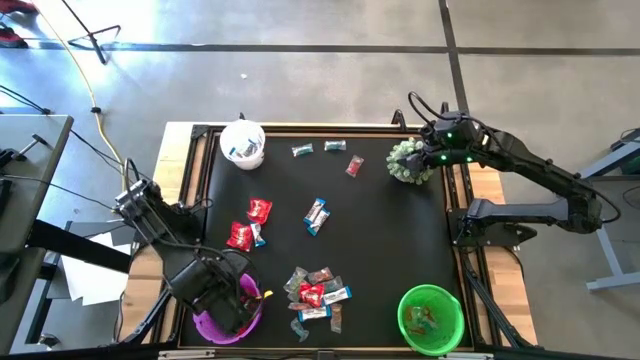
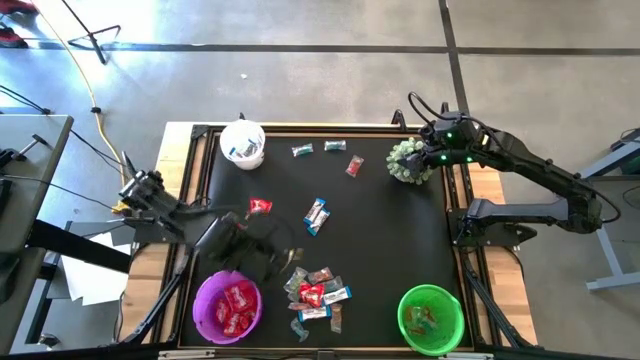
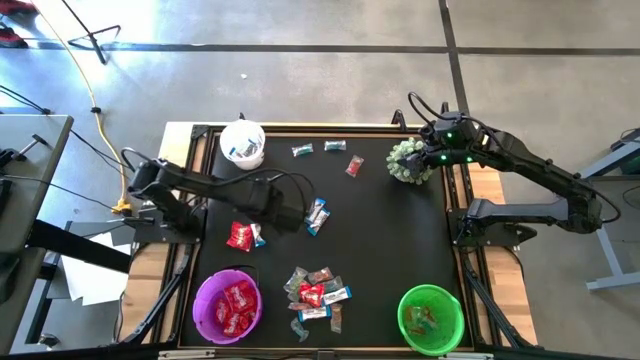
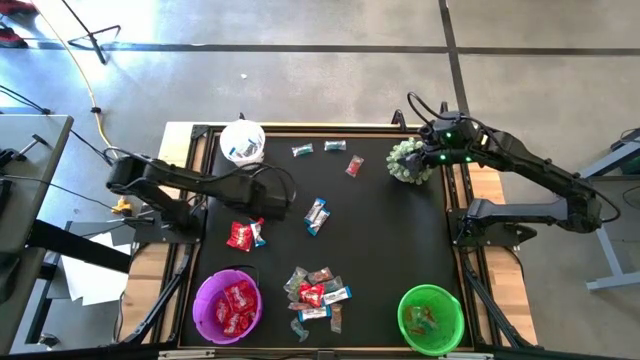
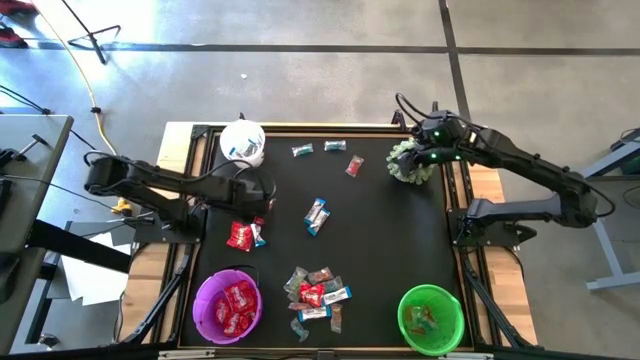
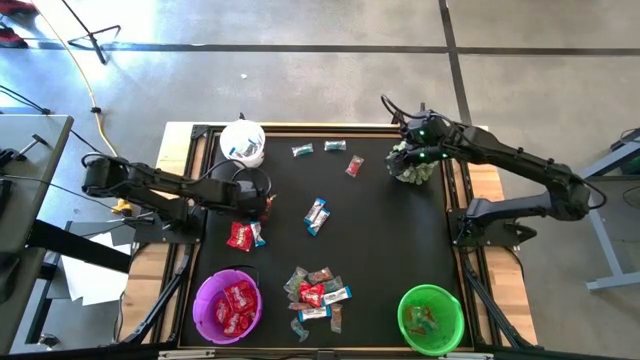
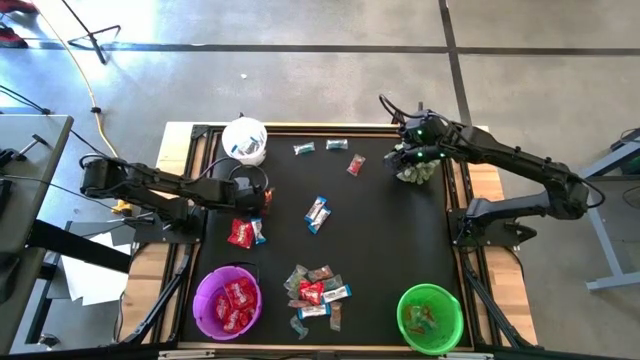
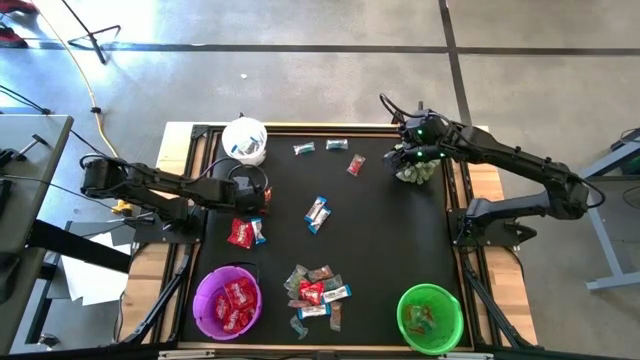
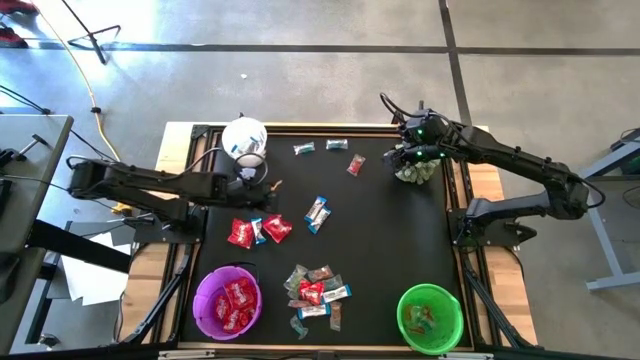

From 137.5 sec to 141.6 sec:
Task: Sort candy
Put the red candy into the violet bucket

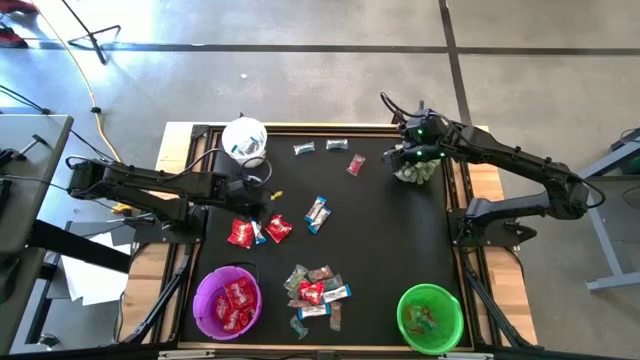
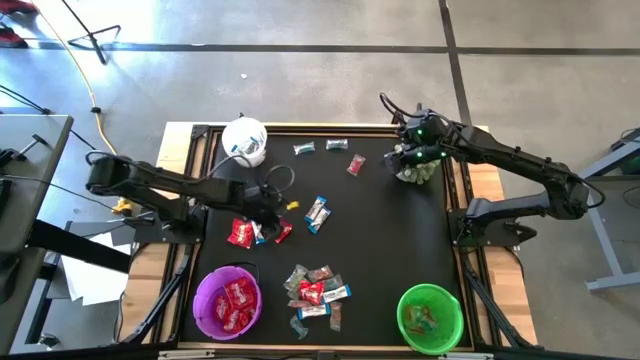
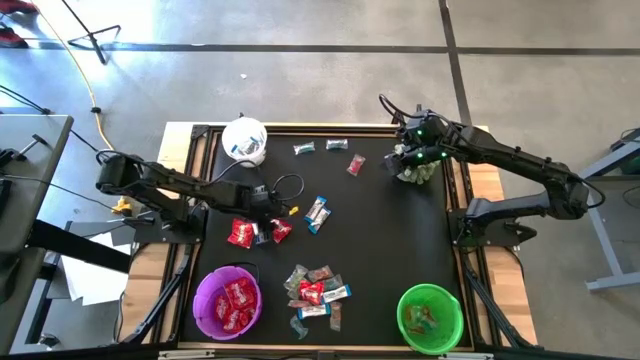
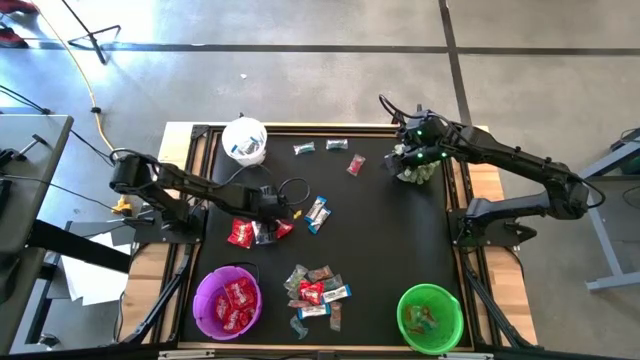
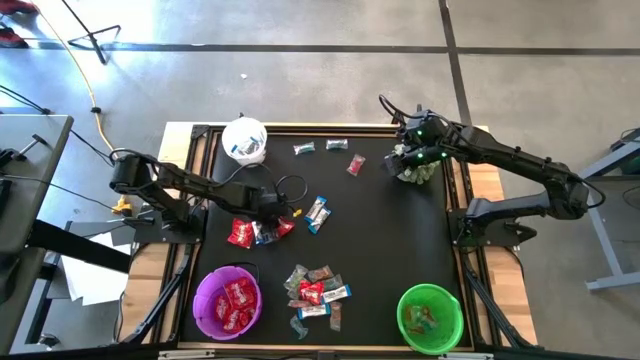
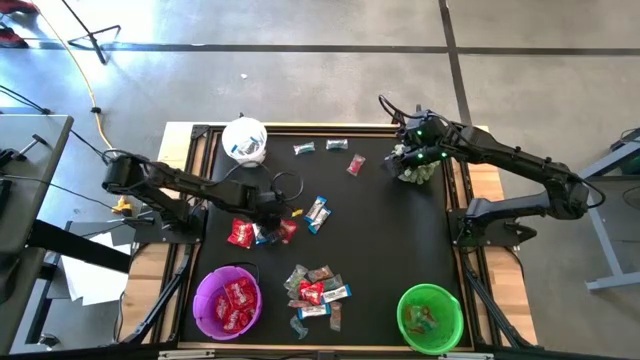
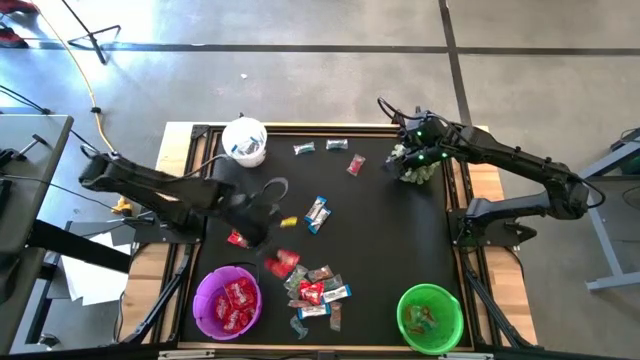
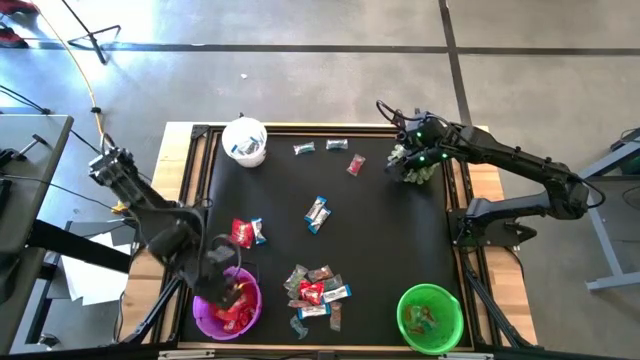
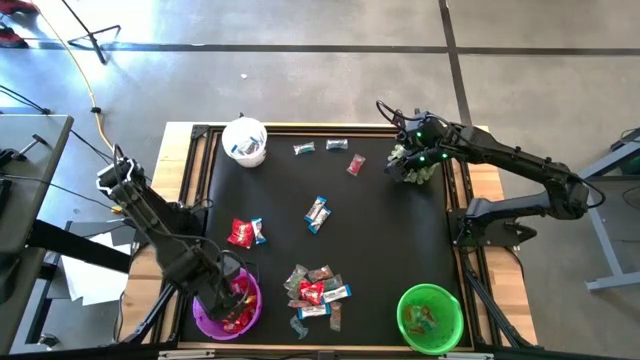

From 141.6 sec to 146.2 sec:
Put the red candy into the violet bucket

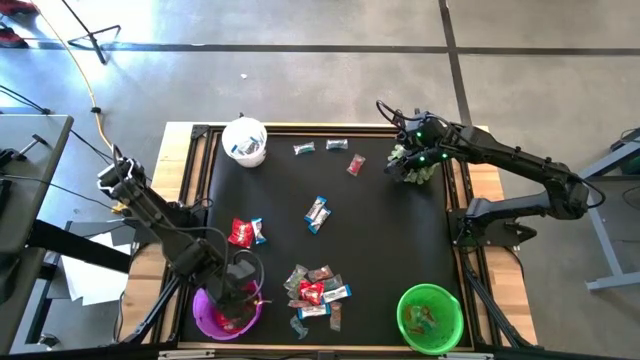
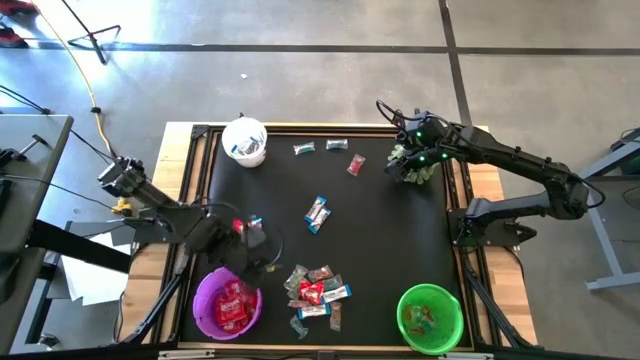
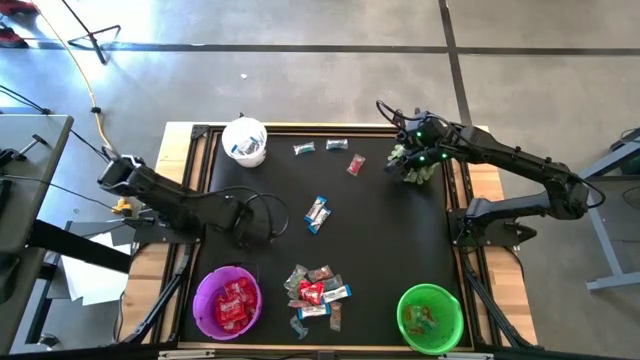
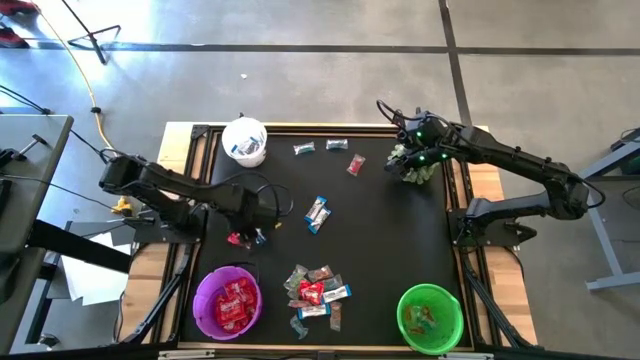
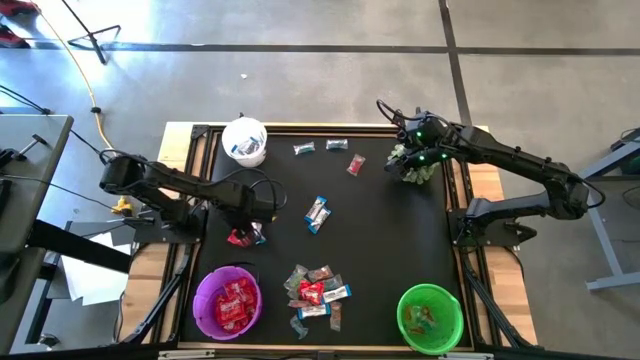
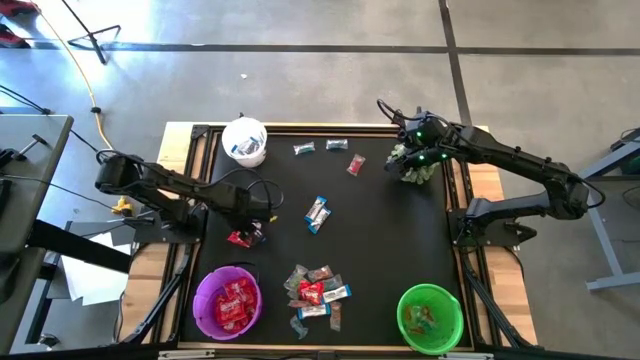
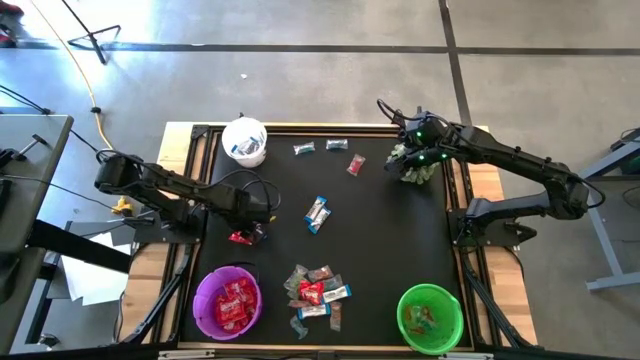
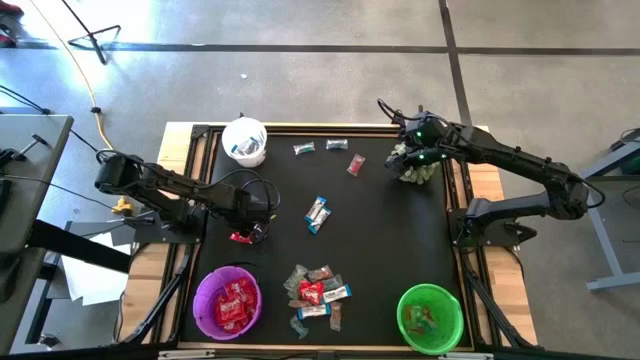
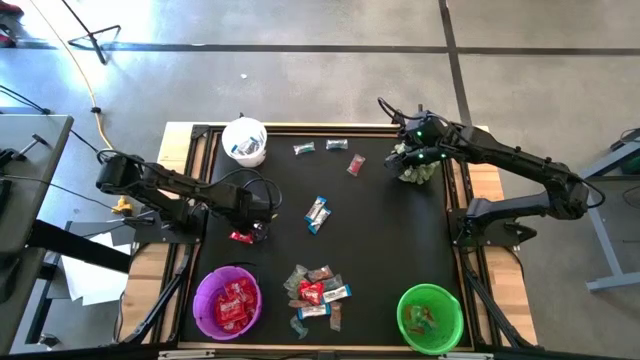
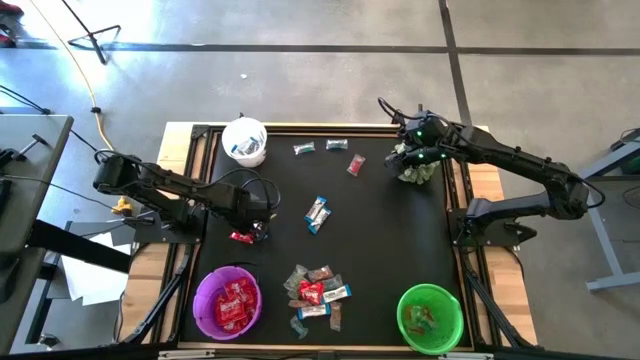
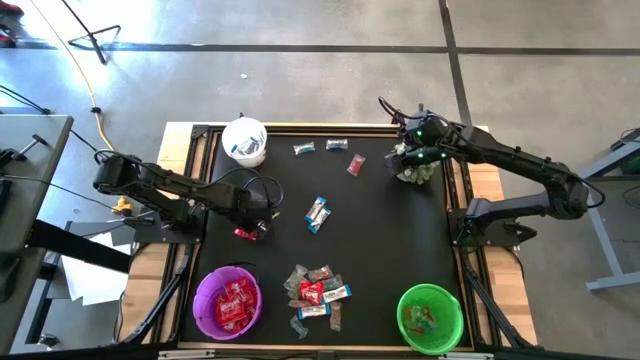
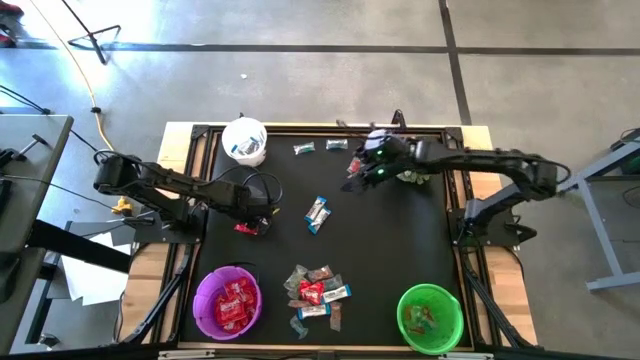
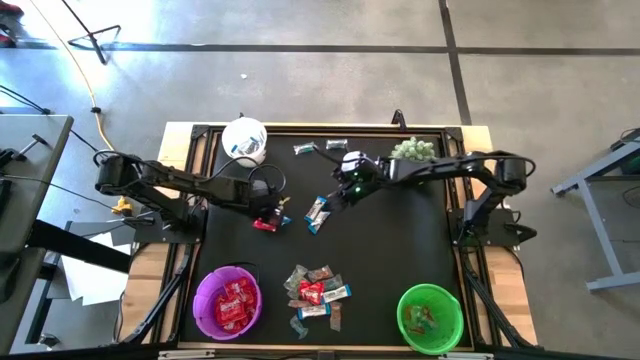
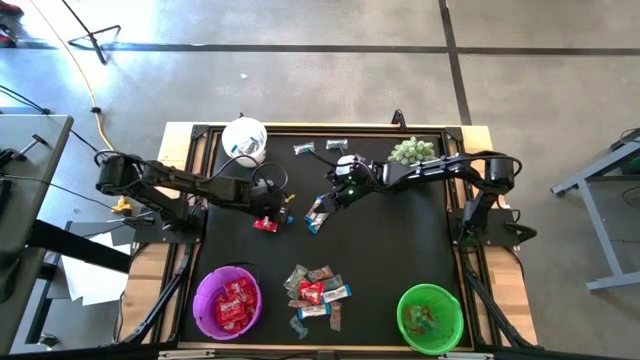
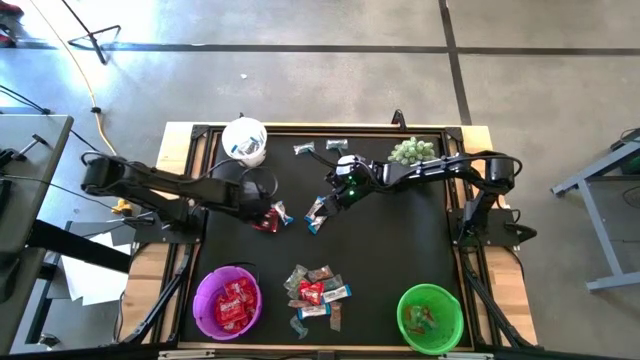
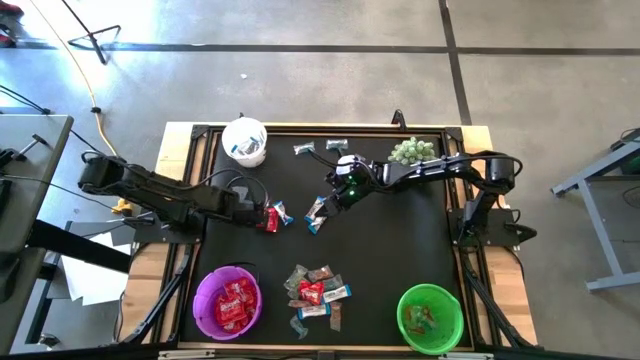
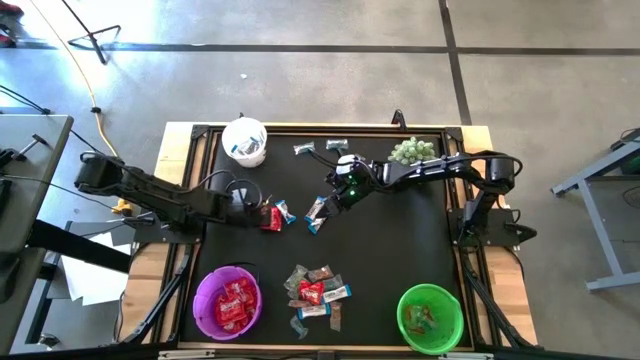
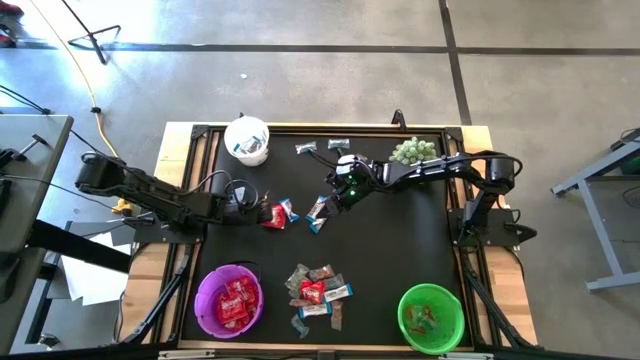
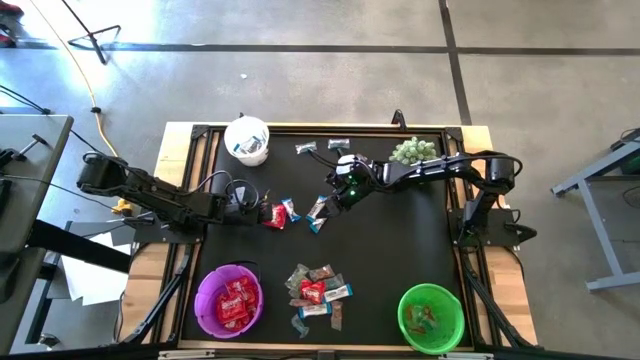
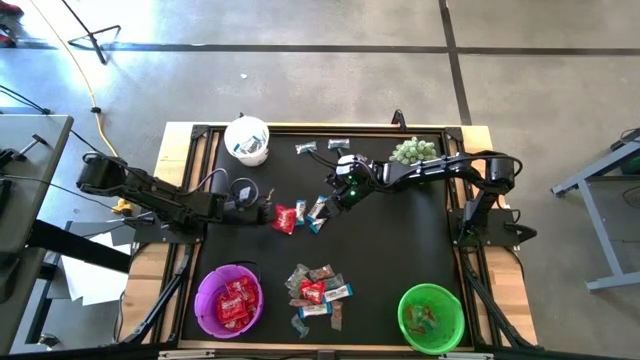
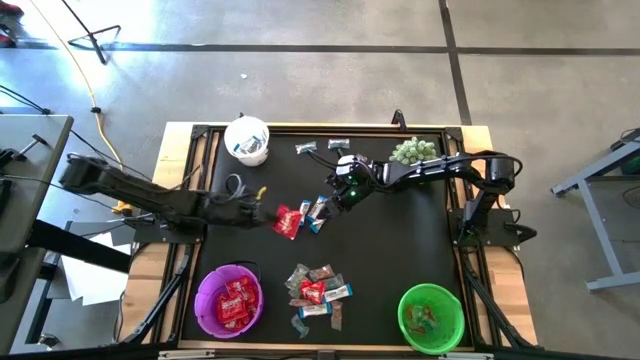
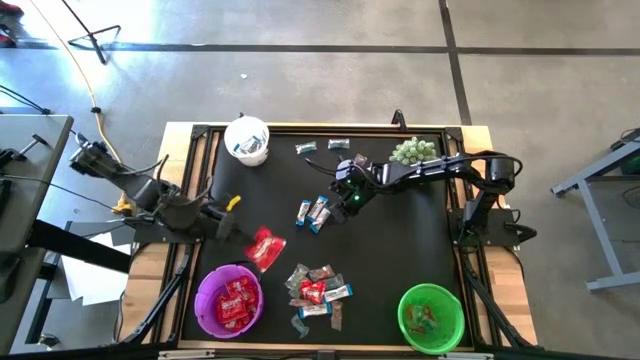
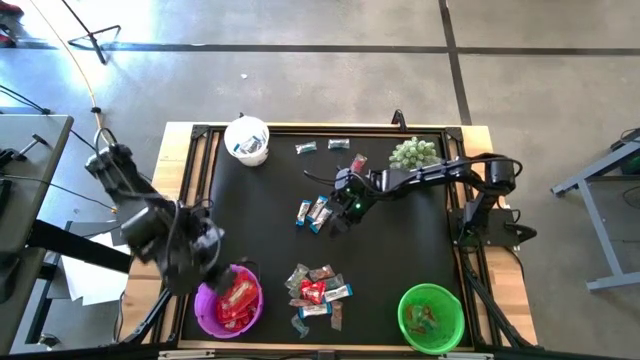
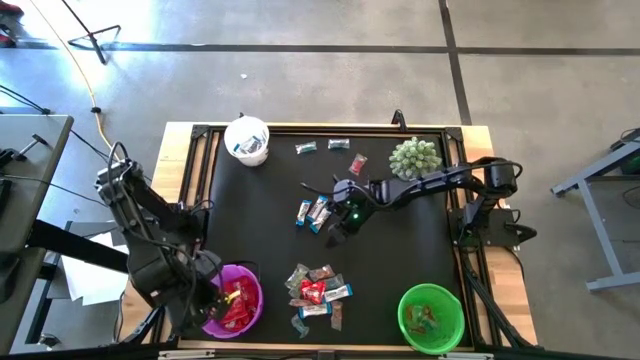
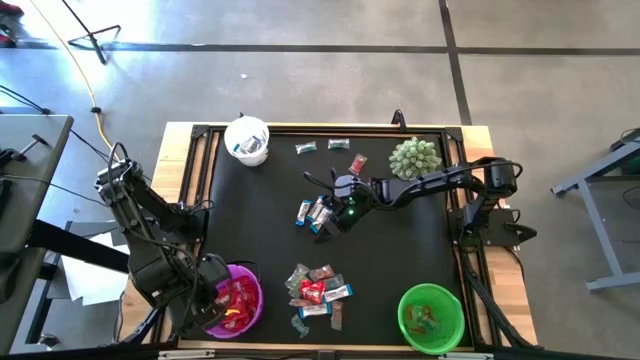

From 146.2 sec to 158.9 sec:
Put the red candy into the violet bucket
